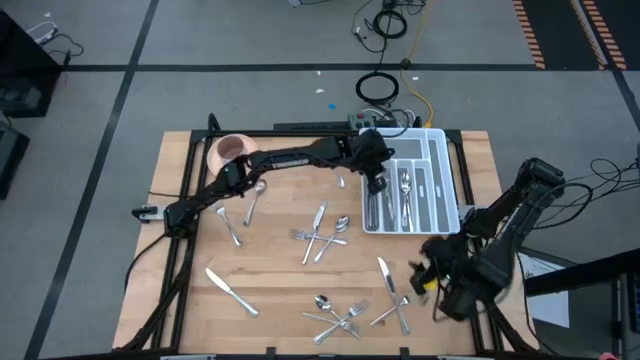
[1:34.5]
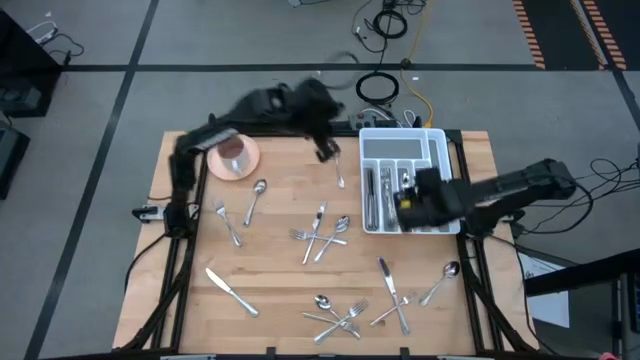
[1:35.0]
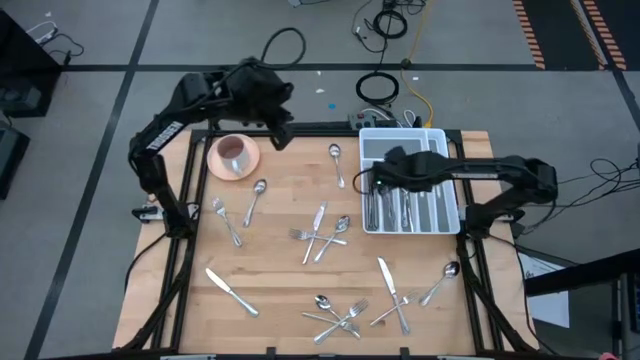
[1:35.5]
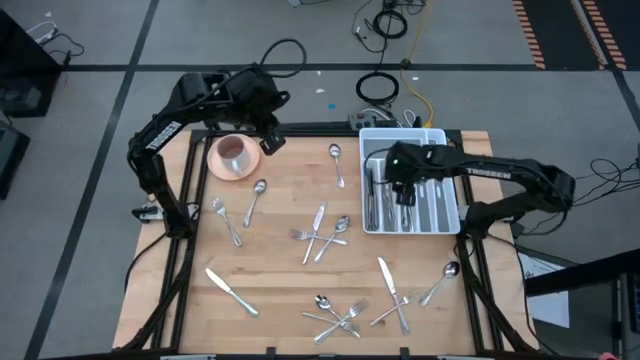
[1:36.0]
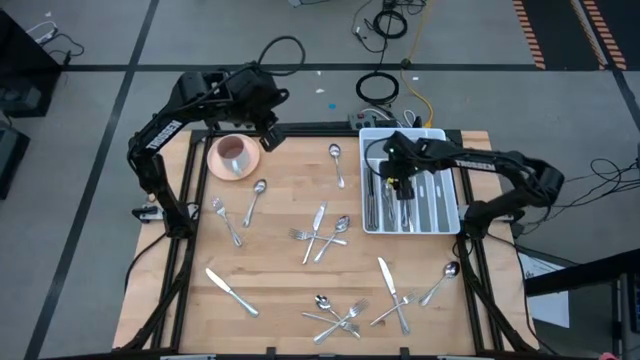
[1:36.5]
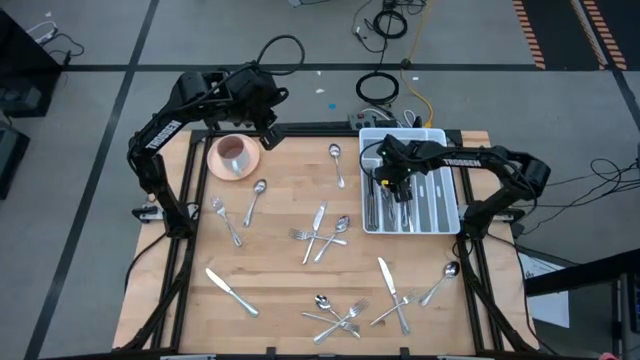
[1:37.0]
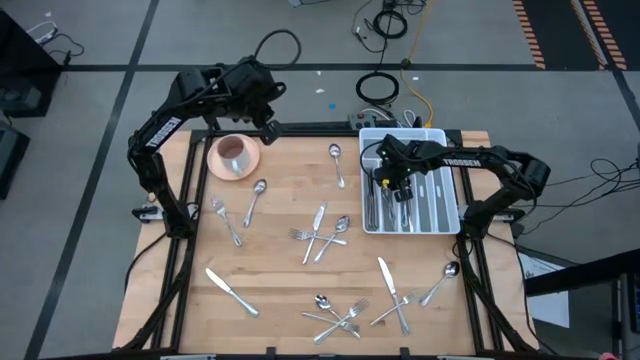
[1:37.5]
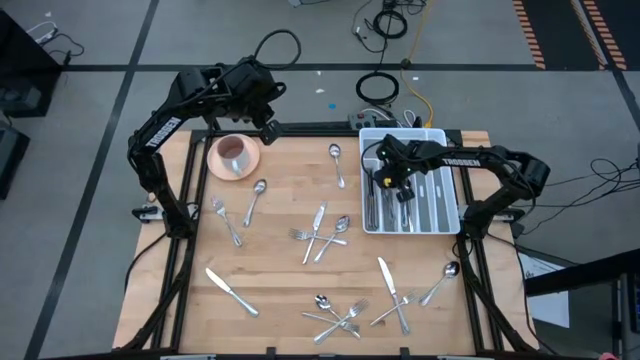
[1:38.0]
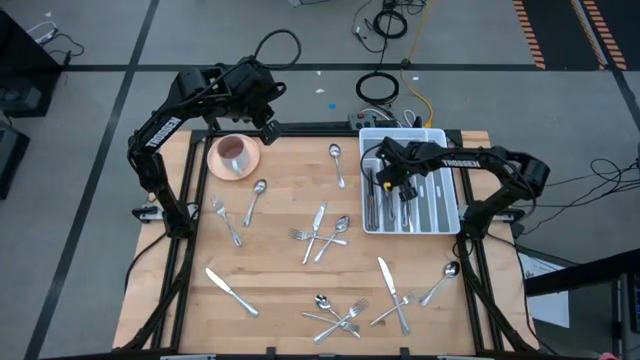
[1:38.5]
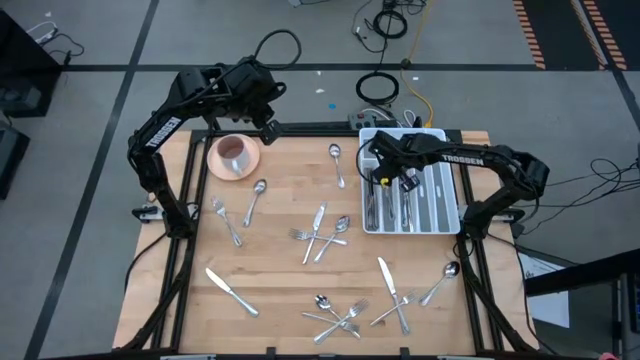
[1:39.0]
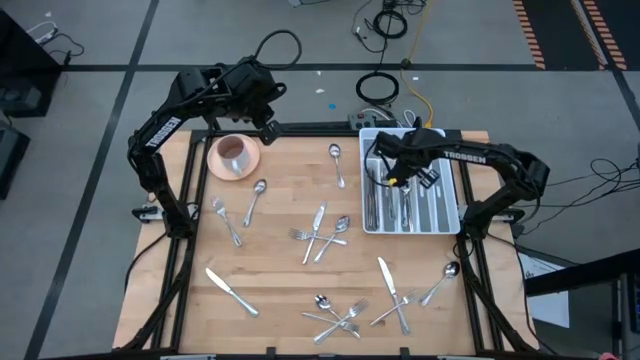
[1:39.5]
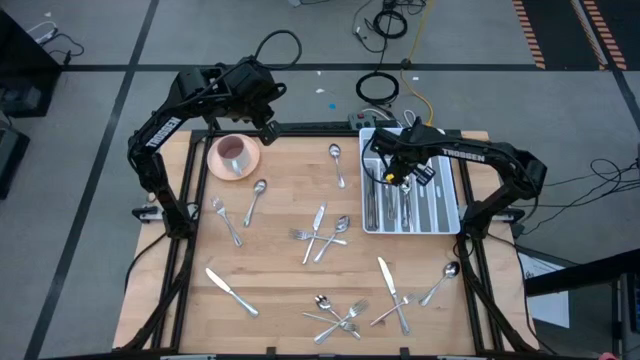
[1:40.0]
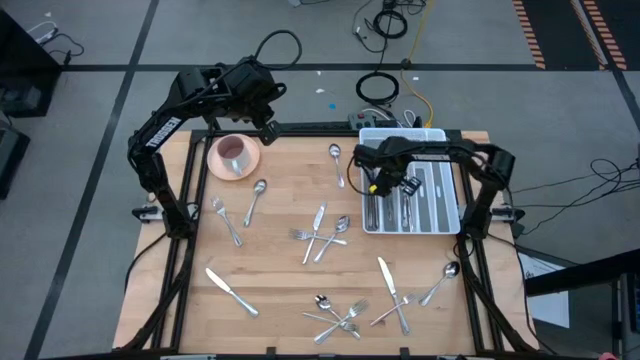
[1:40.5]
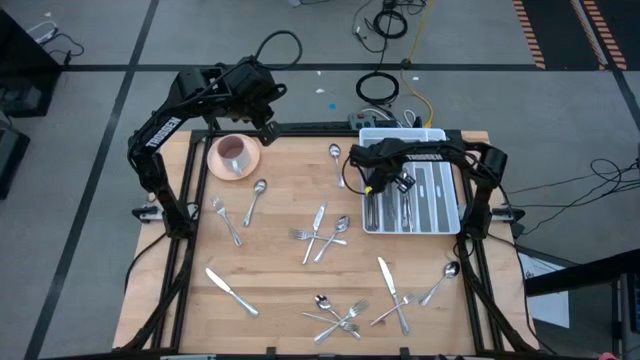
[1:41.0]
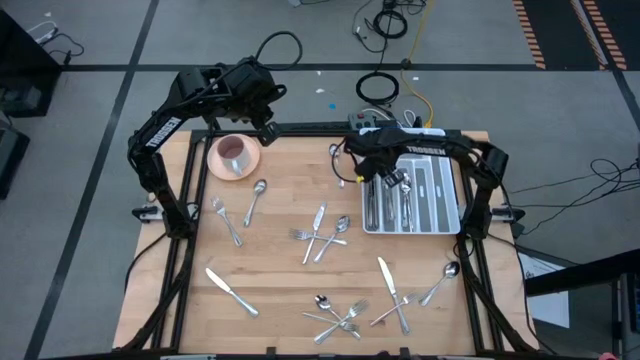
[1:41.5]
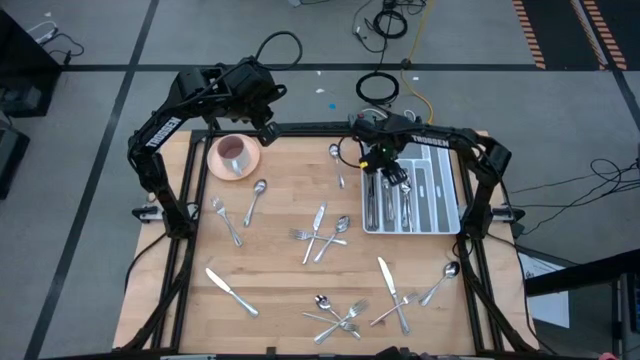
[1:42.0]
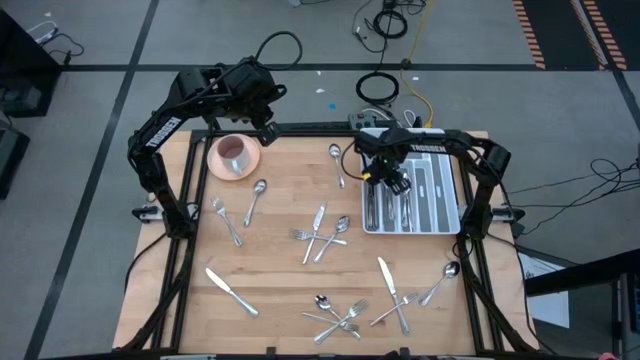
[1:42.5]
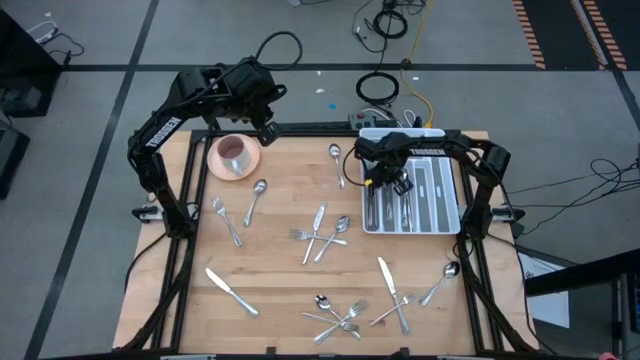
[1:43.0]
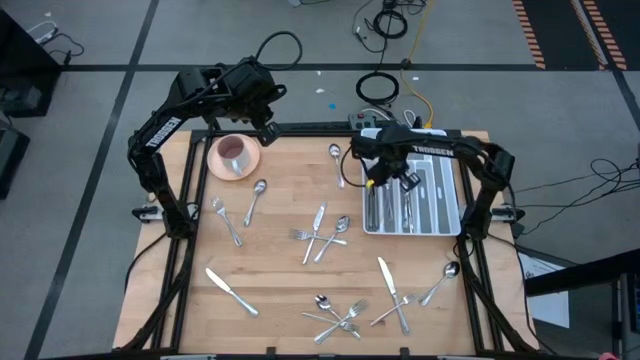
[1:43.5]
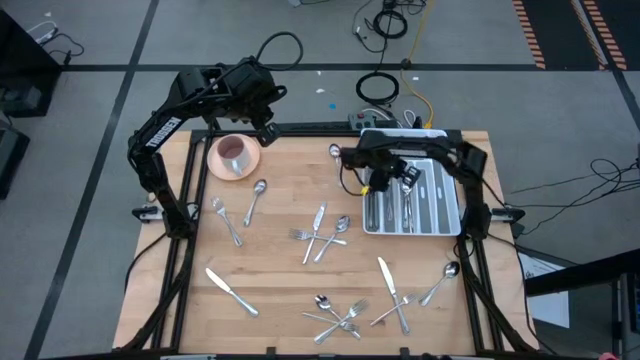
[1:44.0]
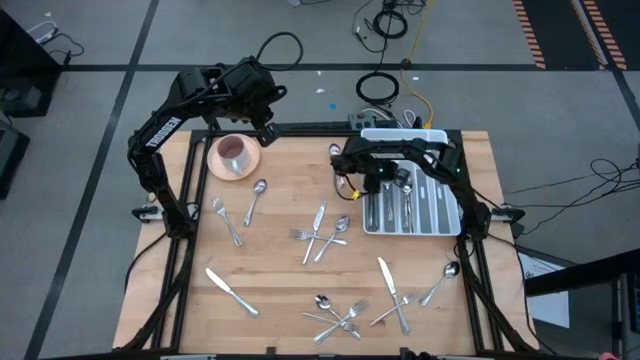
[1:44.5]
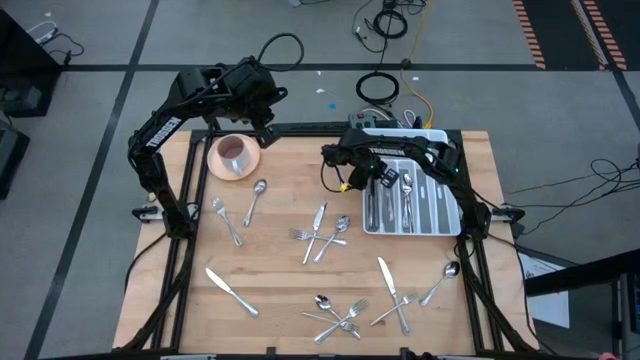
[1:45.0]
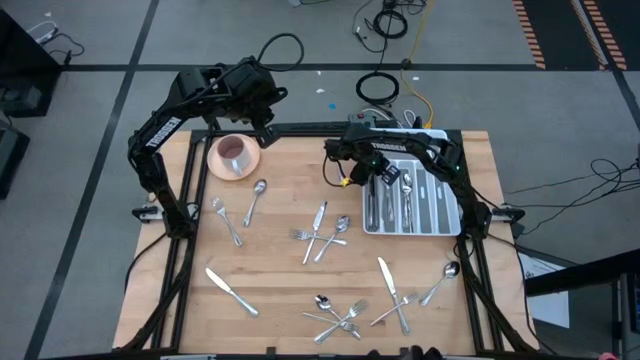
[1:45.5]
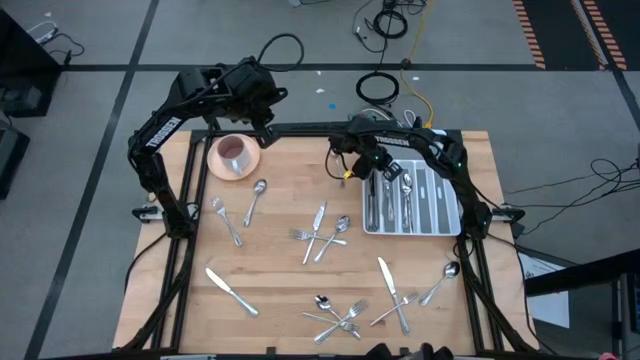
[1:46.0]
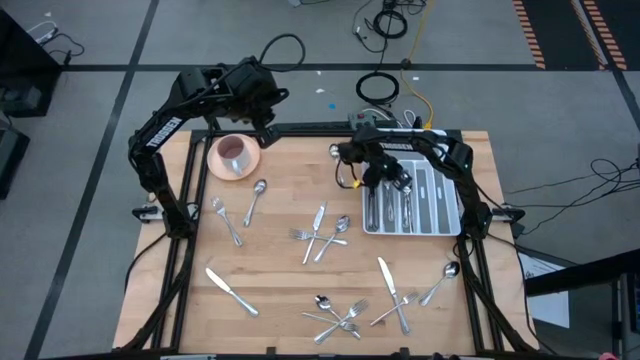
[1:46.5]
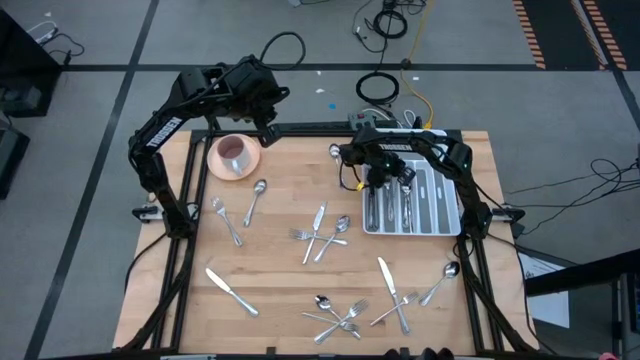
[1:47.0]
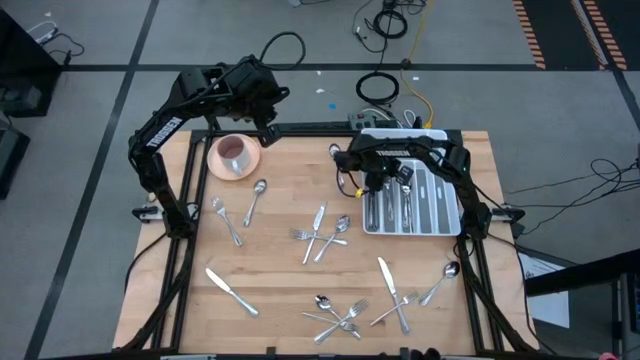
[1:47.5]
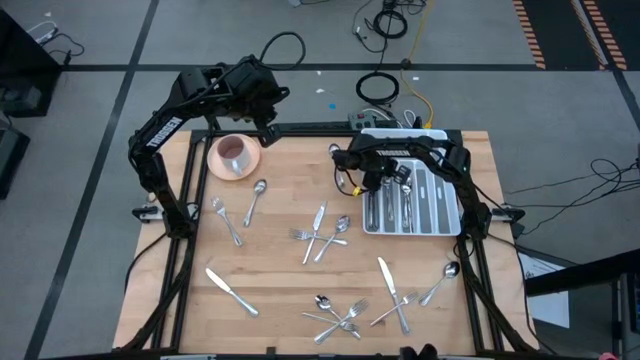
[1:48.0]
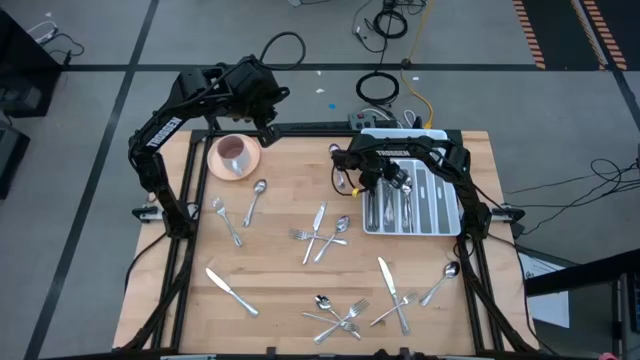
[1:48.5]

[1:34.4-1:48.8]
Task: Sort silverware
Put the silver fork into the white cutlery tray

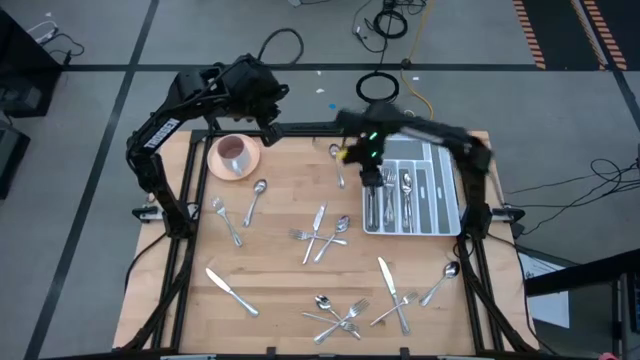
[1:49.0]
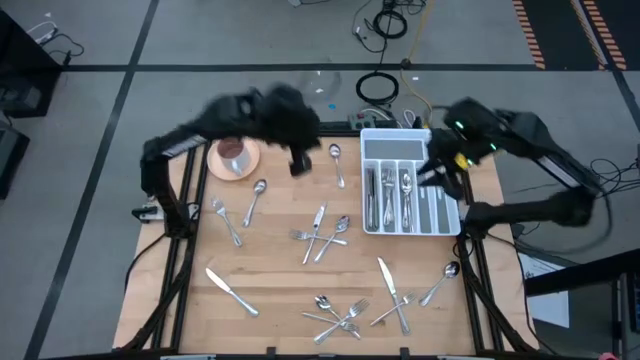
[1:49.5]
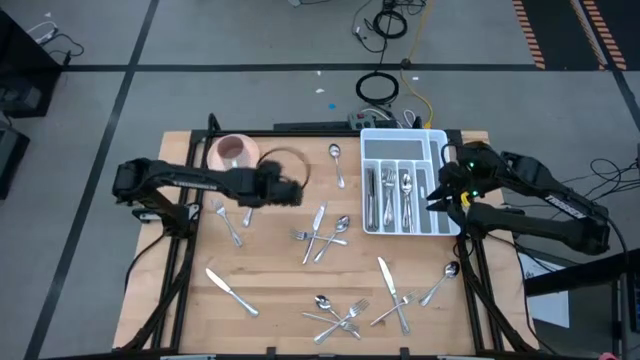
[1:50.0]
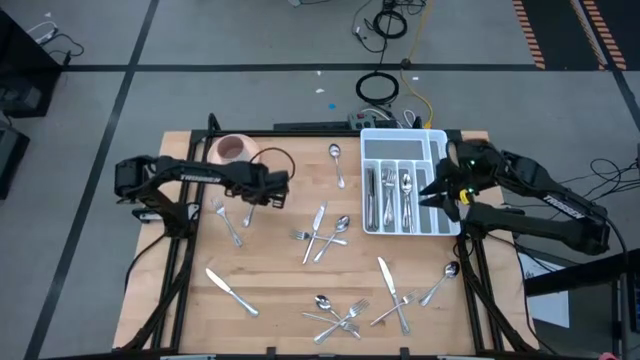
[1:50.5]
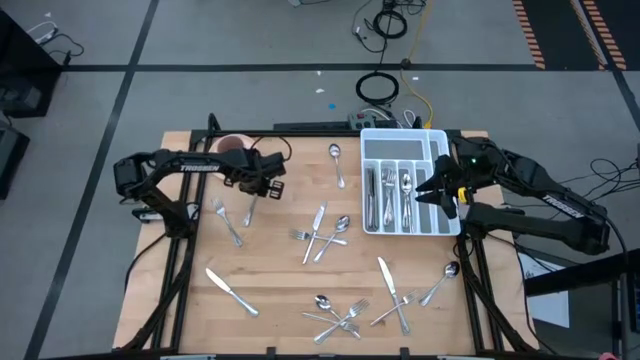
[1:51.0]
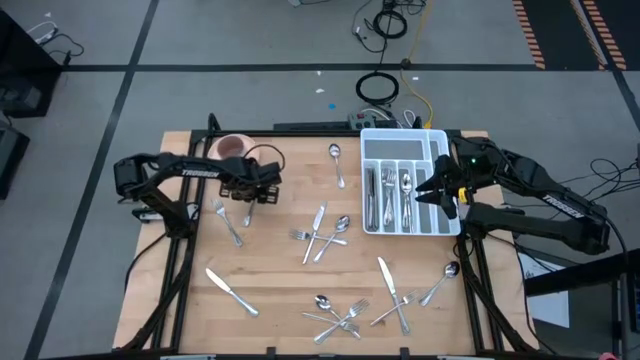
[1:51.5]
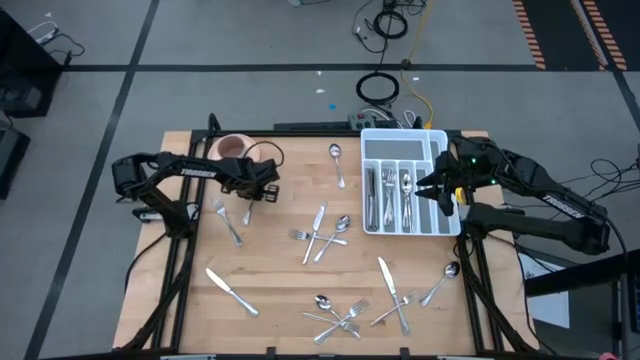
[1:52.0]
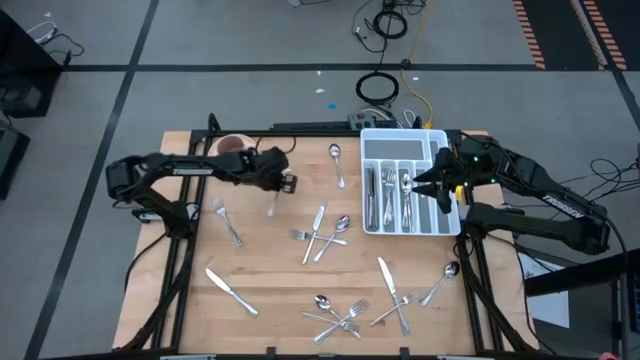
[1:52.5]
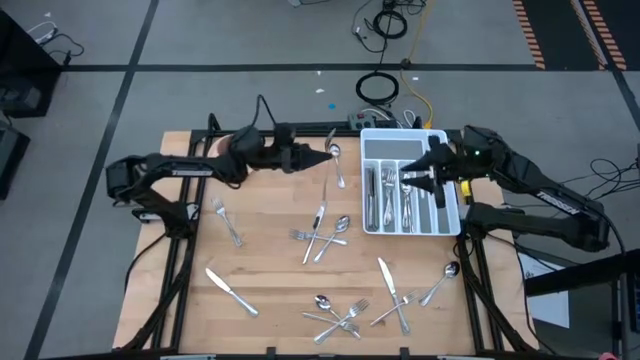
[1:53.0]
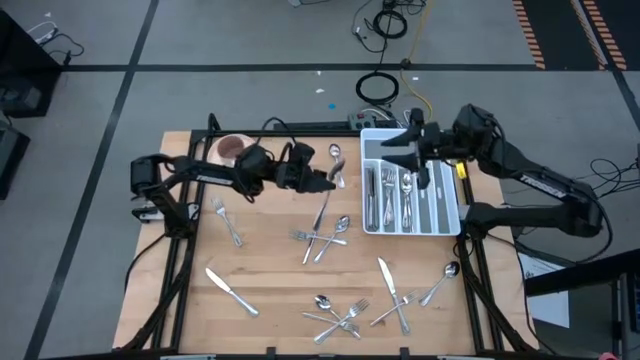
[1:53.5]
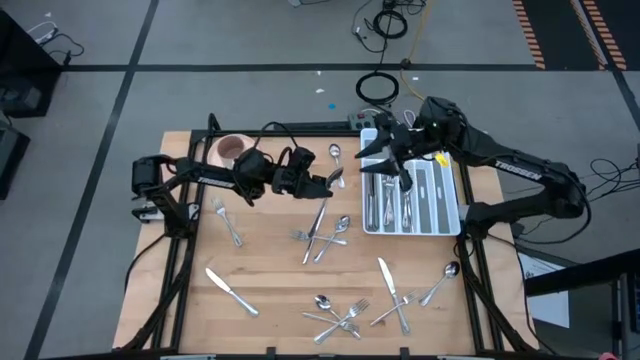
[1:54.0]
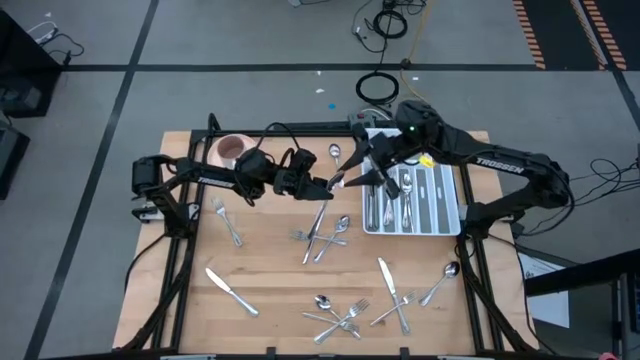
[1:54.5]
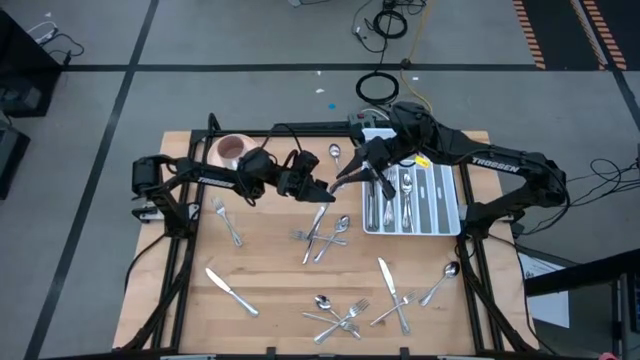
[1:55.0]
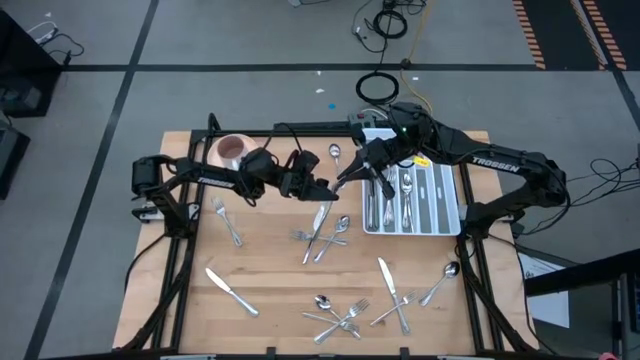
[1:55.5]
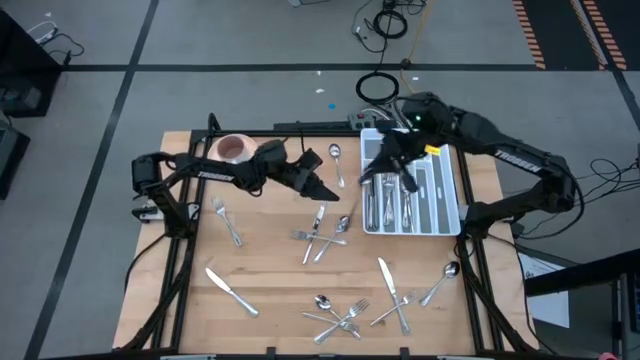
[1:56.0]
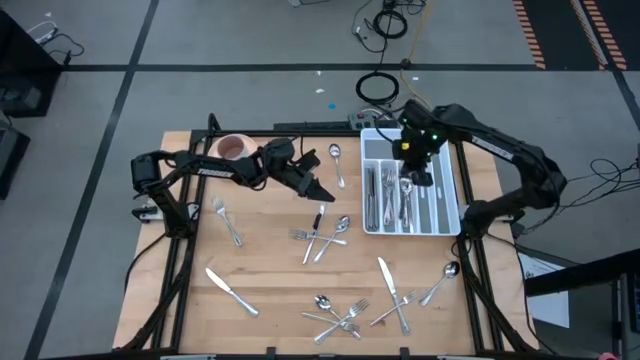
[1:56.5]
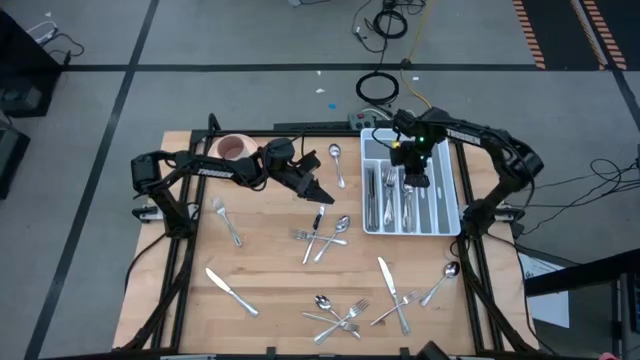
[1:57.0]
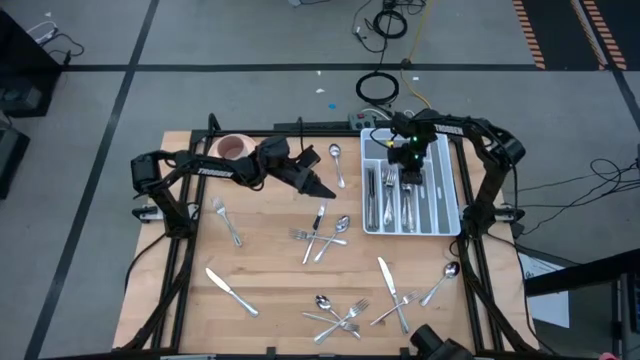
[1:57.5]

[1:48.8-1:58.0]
Put the silver spoon into the white cutlery tray
